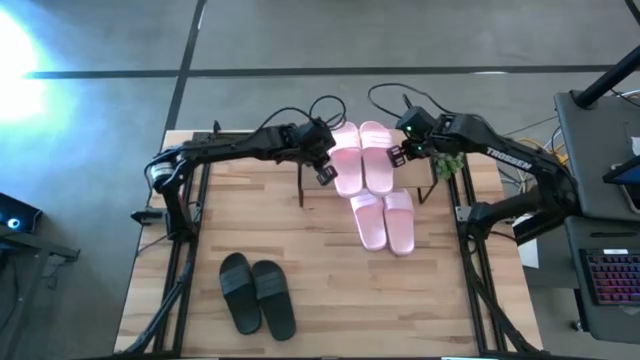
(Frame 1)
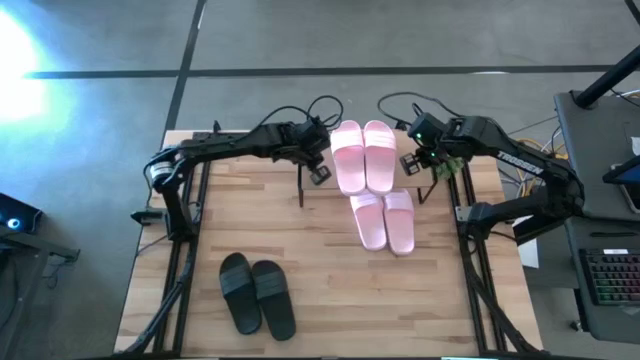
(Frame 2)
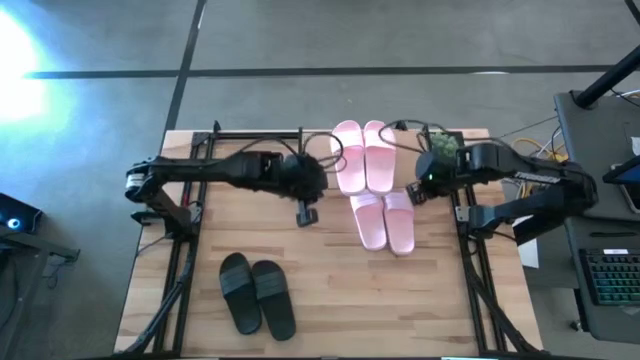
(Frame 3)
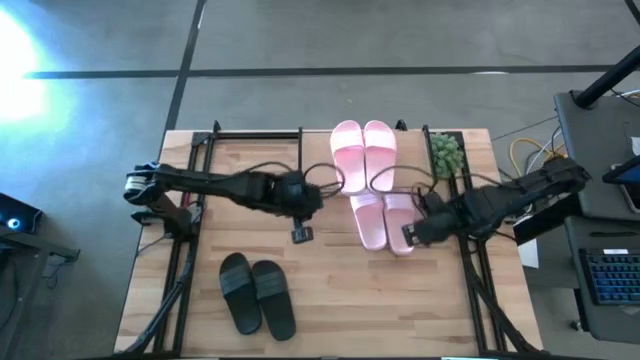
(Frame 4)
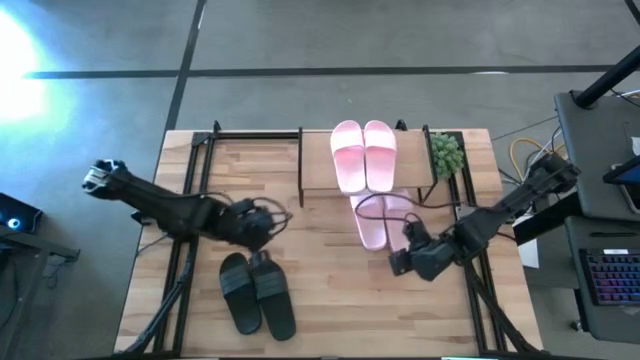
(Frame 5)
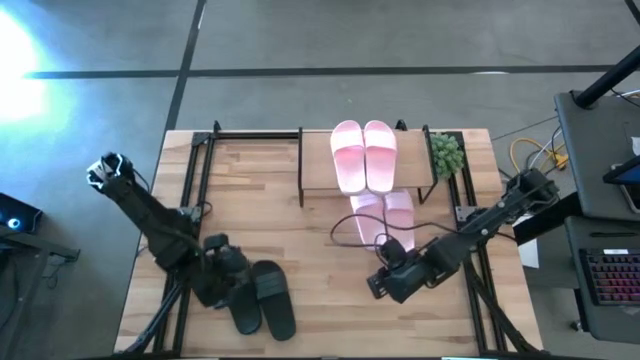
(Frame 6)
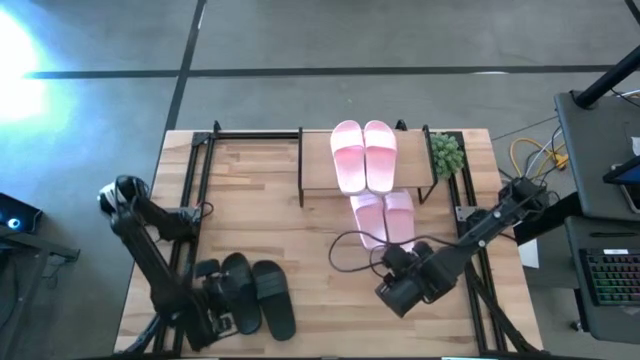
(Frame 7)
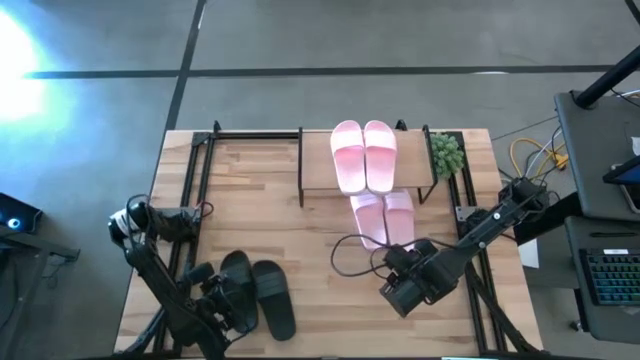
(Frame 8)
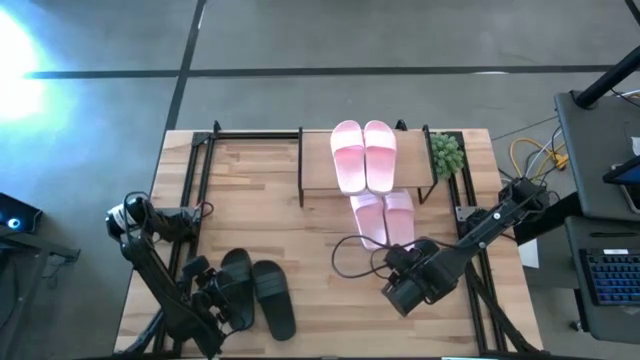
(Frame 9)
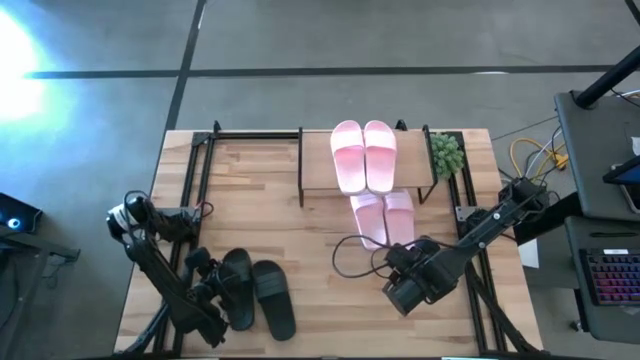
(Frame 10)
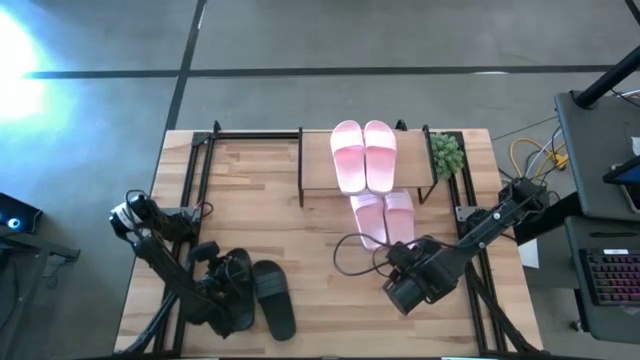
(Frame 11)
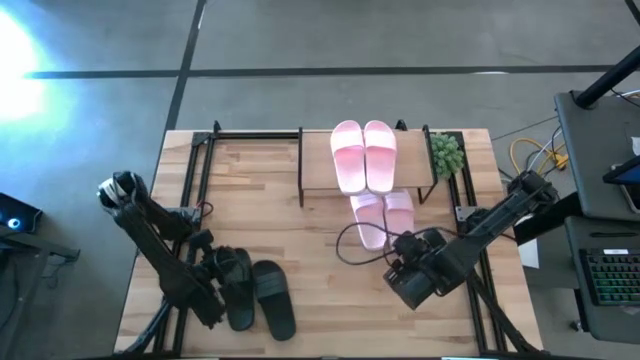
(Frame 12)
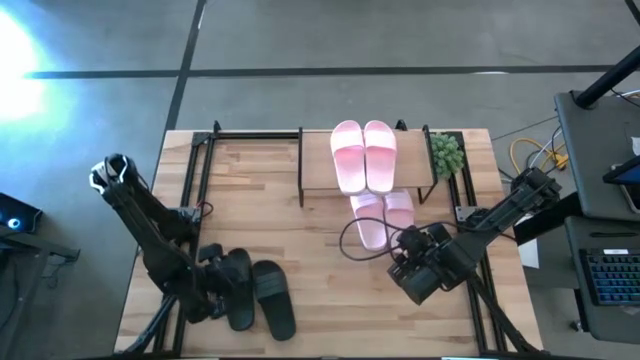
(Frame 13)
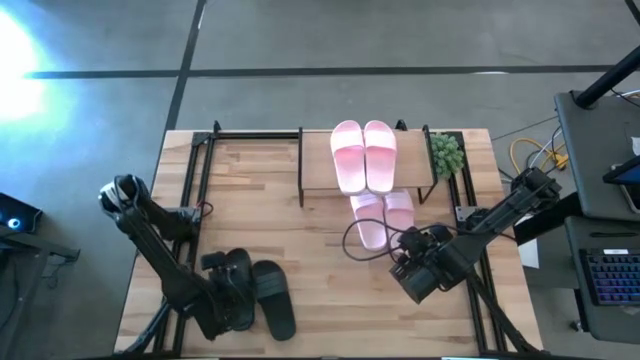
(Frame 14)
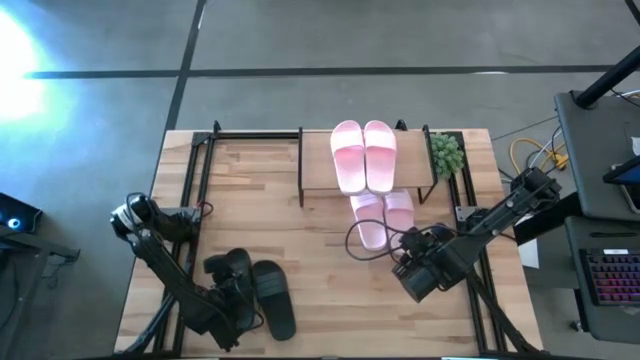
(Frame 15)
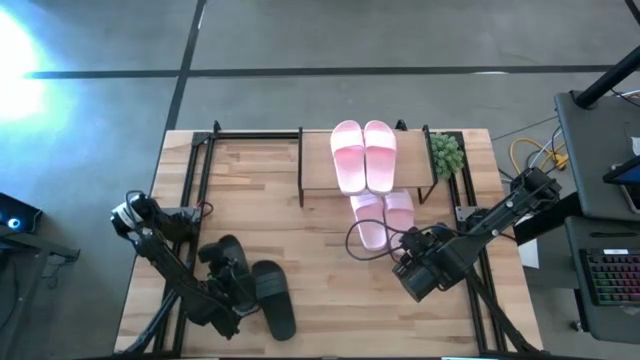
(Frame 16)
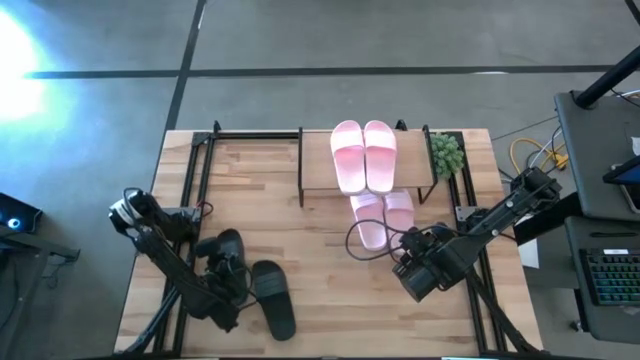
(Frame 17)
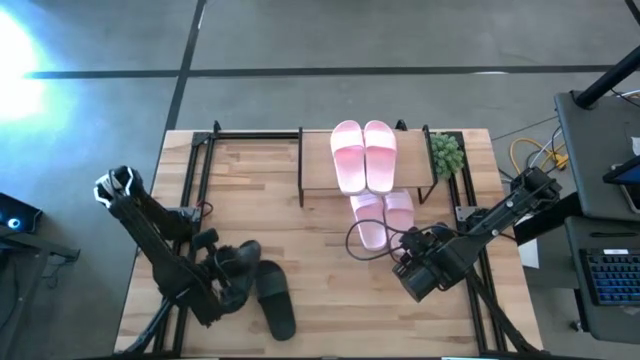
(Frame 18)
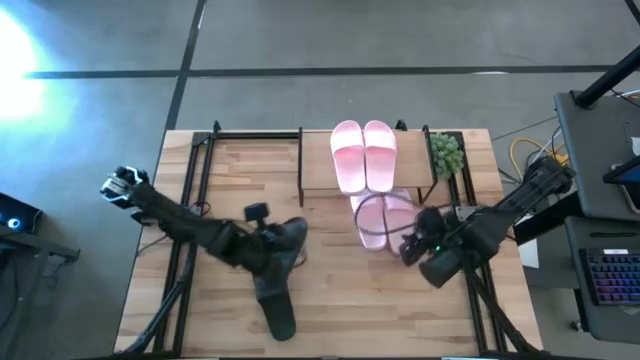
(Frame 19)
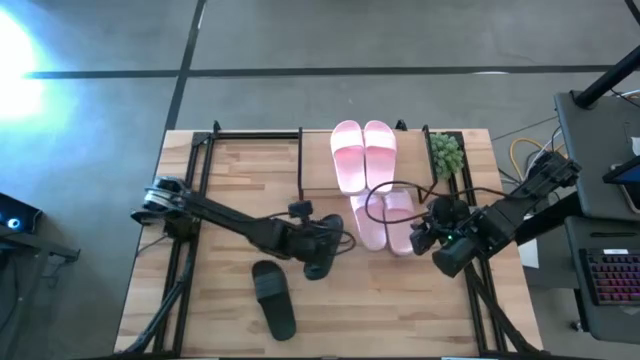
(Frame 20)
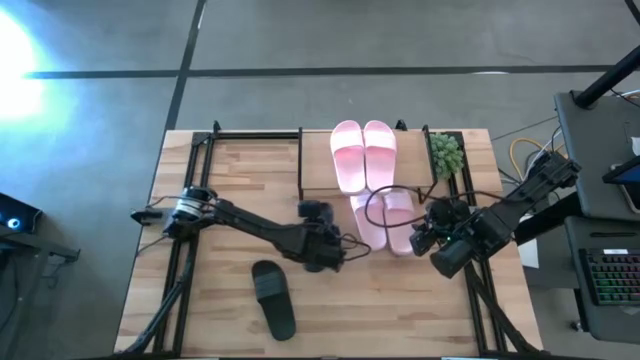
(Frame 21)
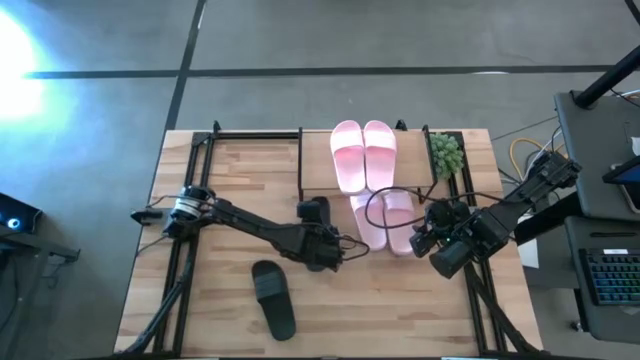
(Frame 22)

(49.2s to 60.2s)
Task: Pick and place slides into the shelf
Put the black slipper under the shelf

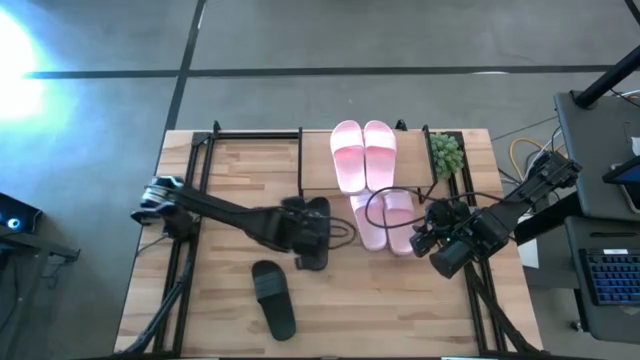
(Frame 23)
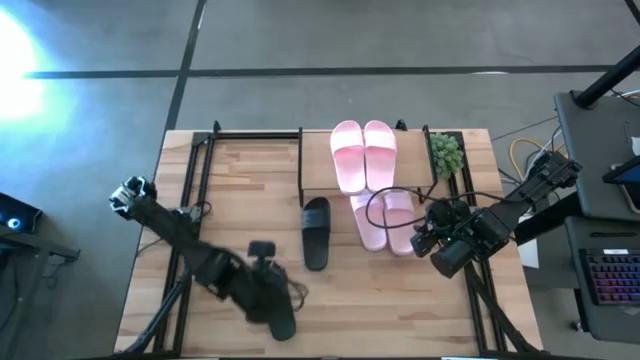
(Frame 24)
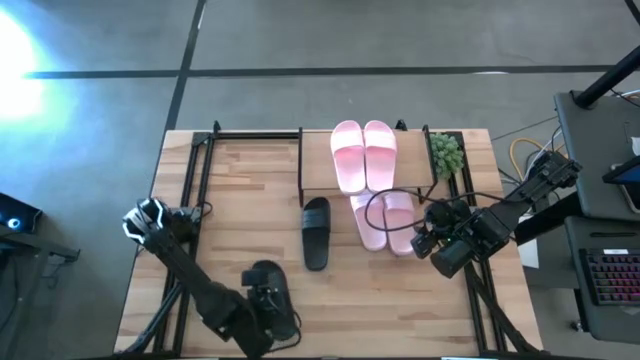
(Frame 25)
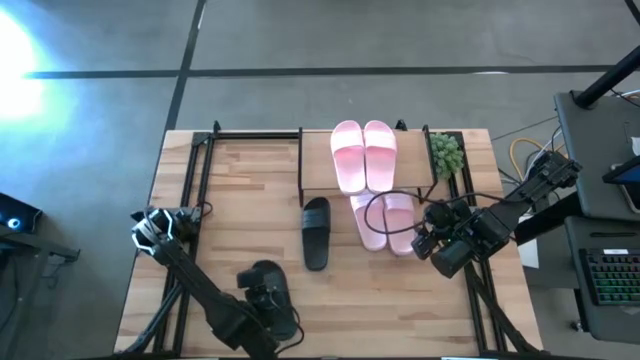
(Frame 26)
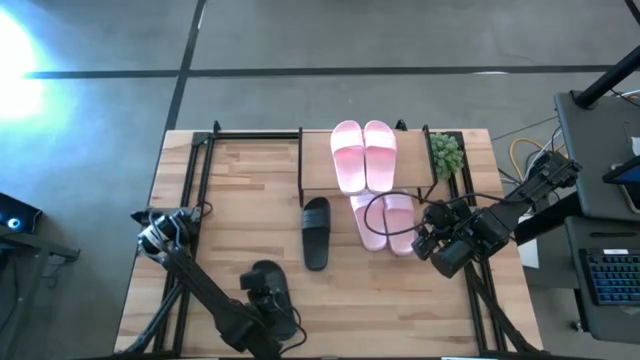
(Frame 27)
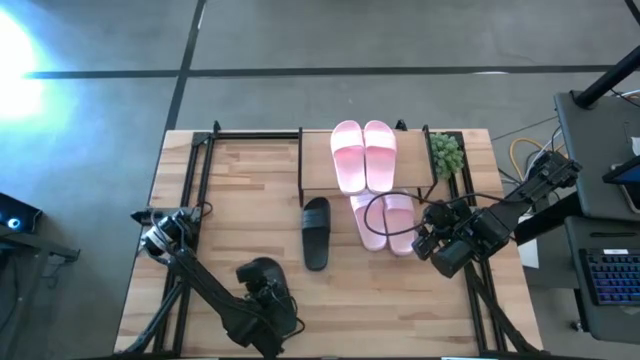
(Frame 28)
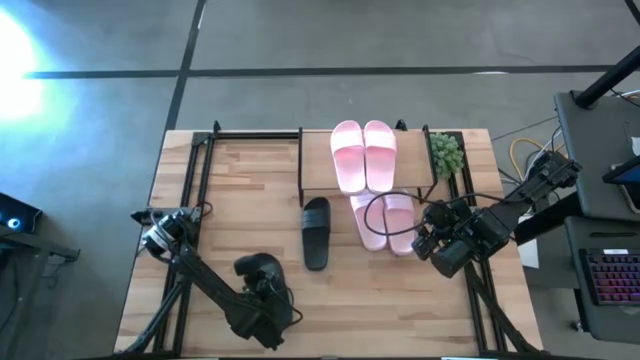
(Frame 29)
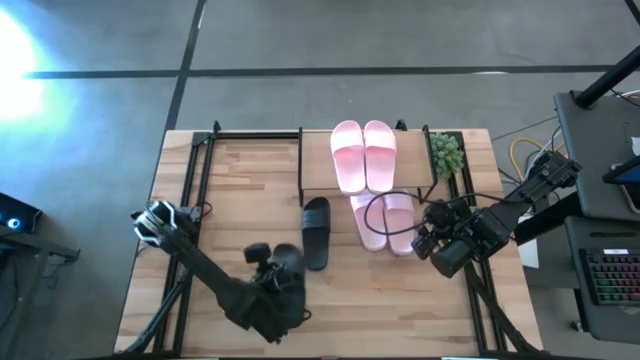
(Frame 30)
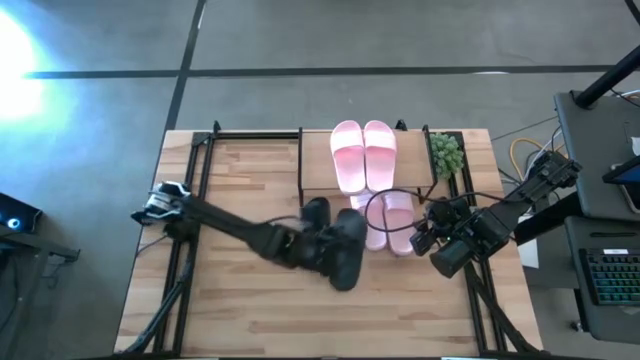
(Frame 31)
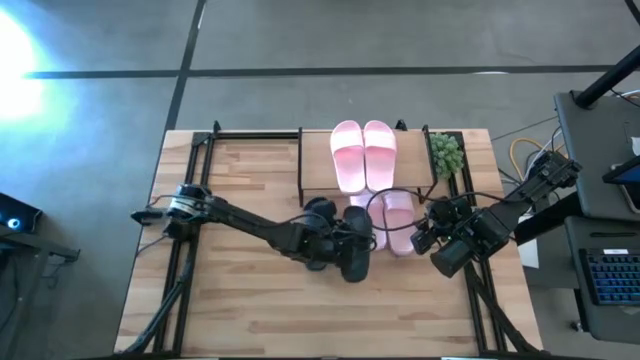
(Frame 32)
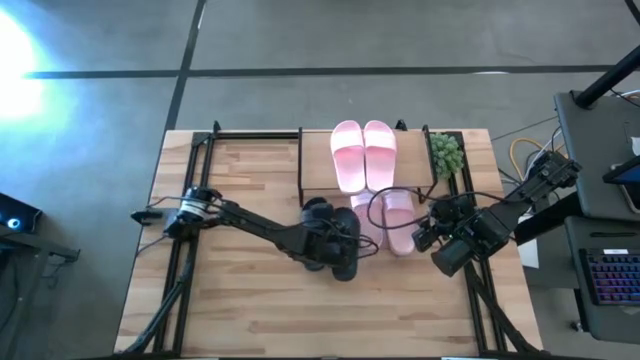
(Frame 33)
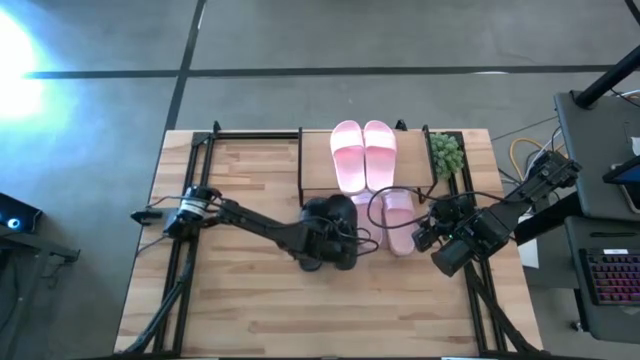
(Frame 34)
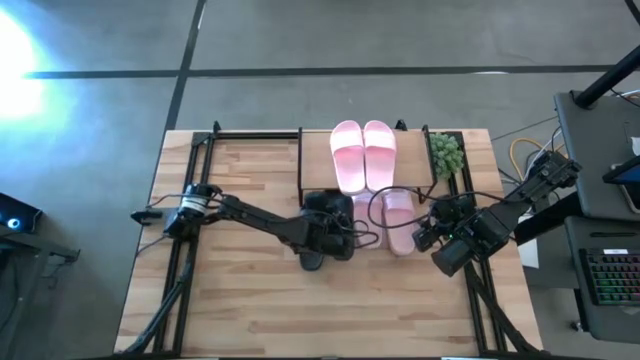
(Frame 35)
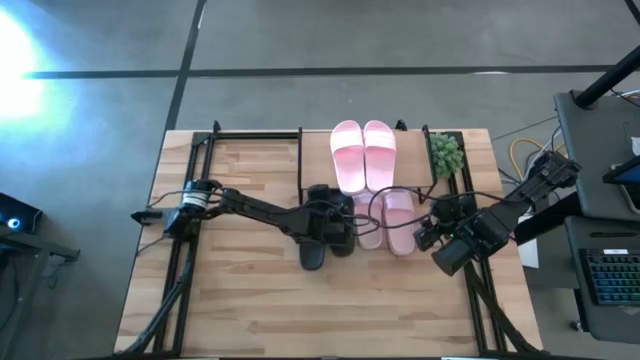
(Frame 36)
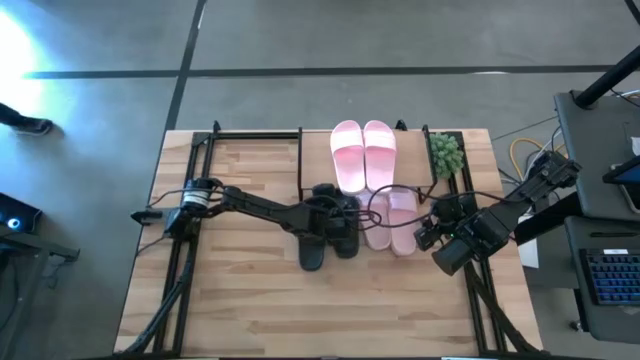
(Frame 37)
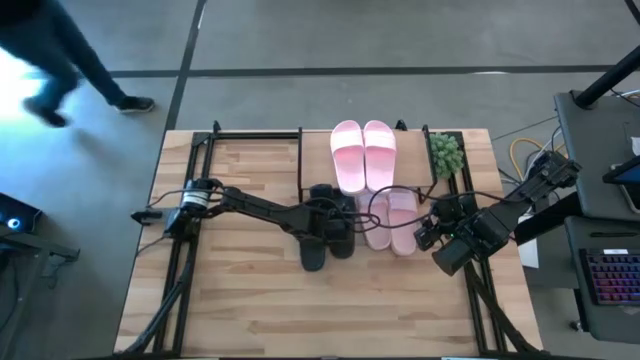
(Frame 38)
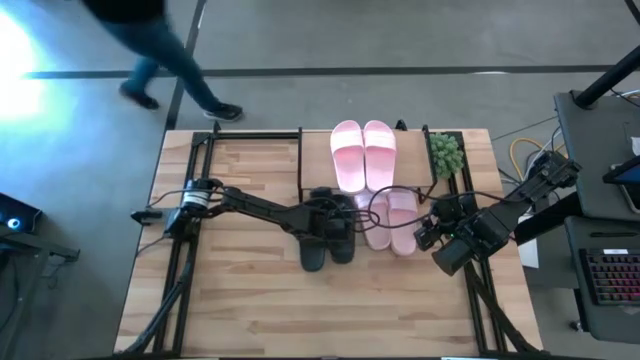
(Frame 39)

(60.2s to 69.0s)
Put the black slipper under the shelf
